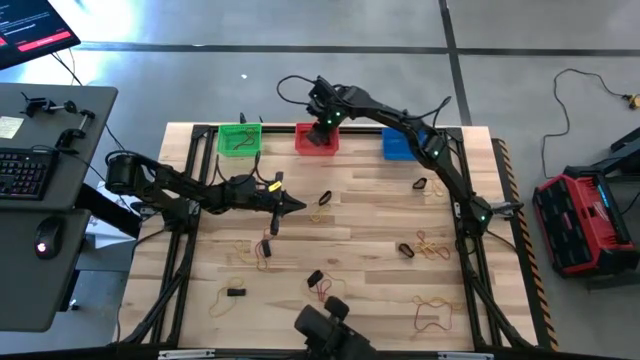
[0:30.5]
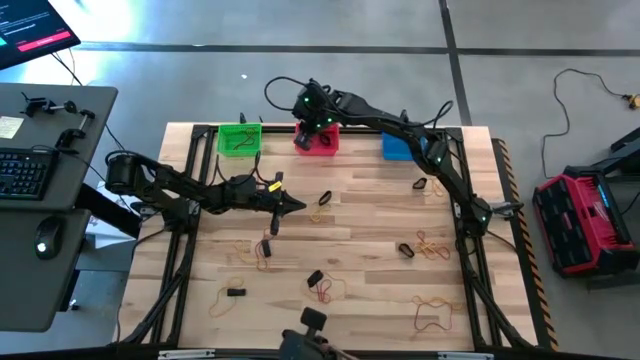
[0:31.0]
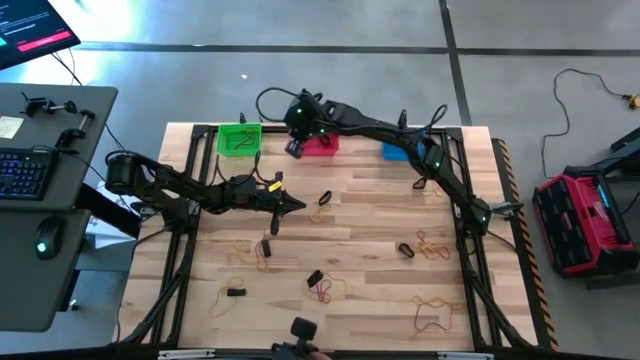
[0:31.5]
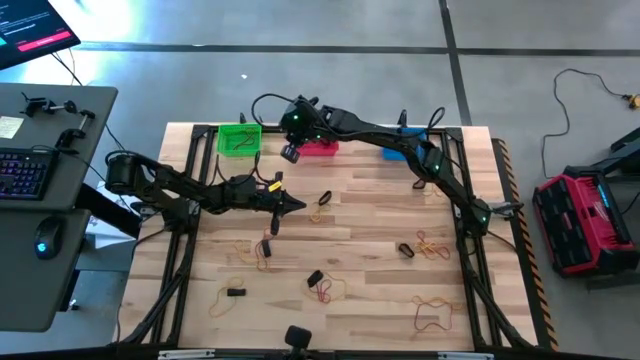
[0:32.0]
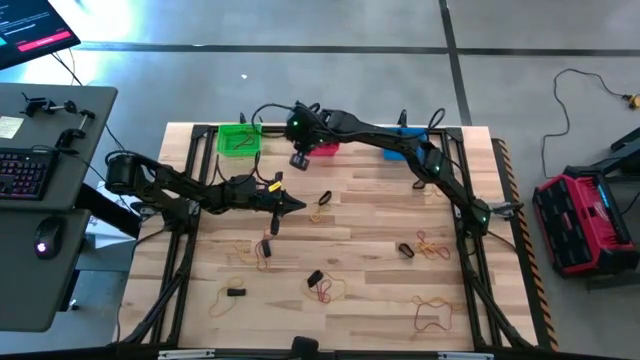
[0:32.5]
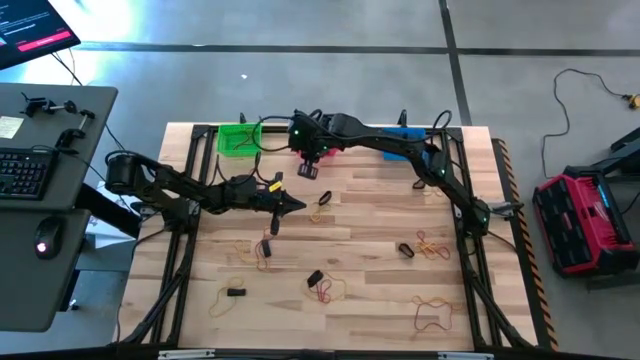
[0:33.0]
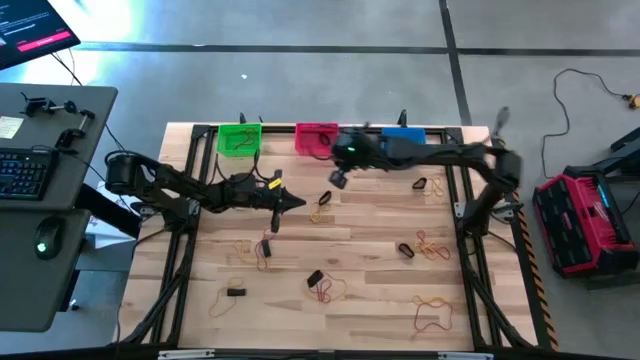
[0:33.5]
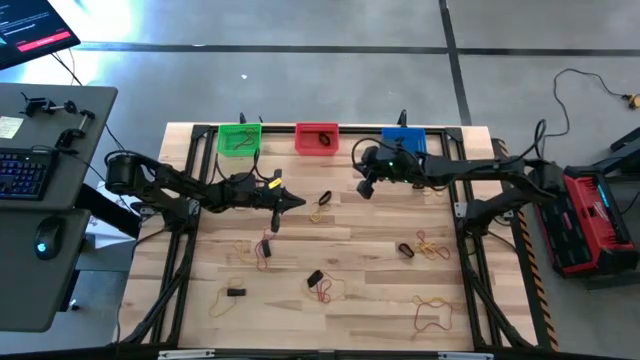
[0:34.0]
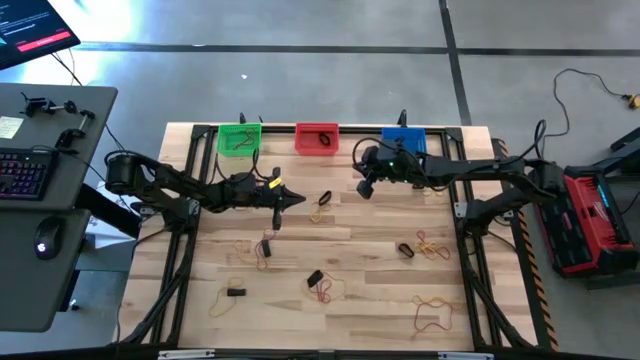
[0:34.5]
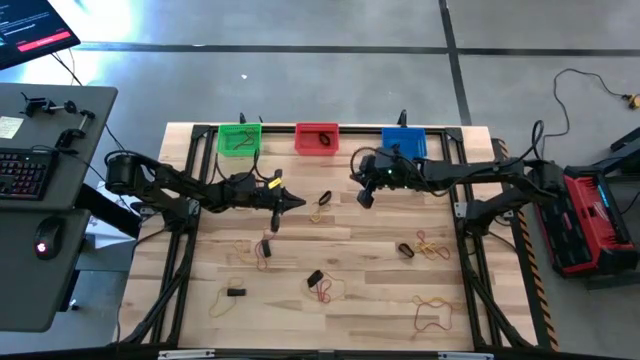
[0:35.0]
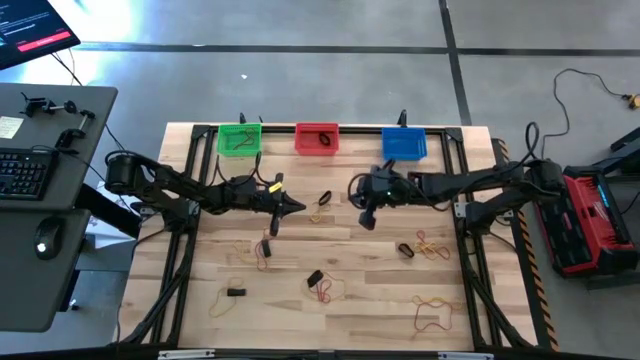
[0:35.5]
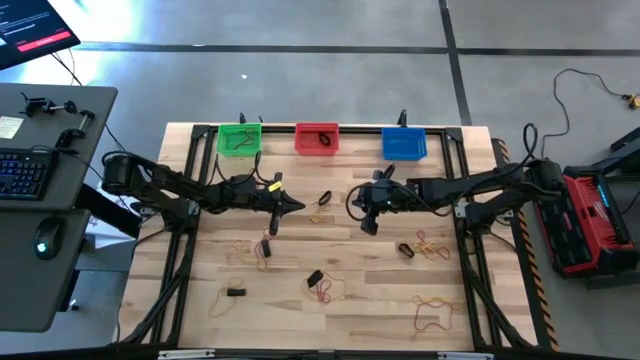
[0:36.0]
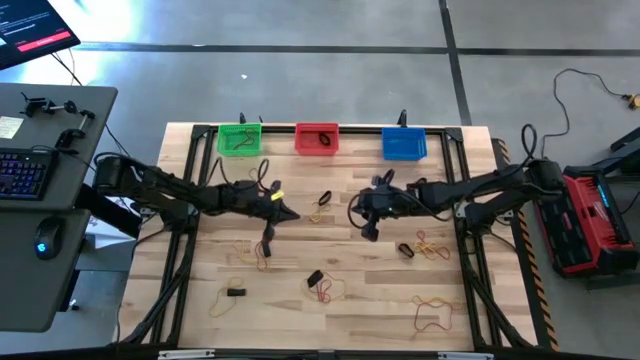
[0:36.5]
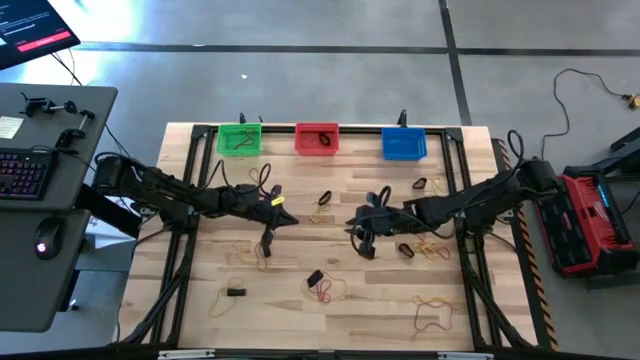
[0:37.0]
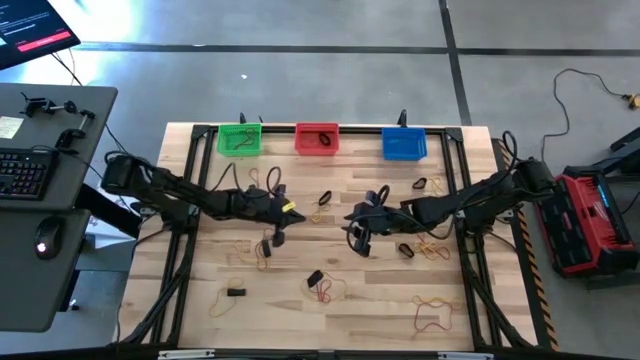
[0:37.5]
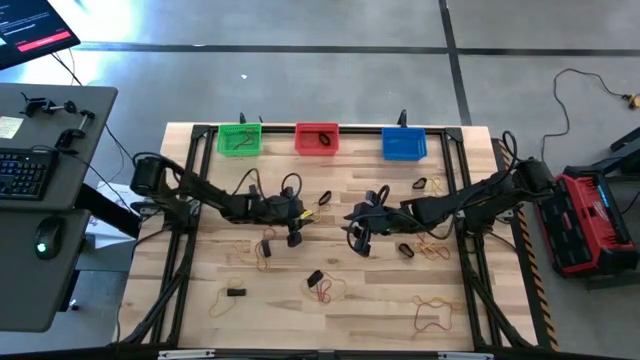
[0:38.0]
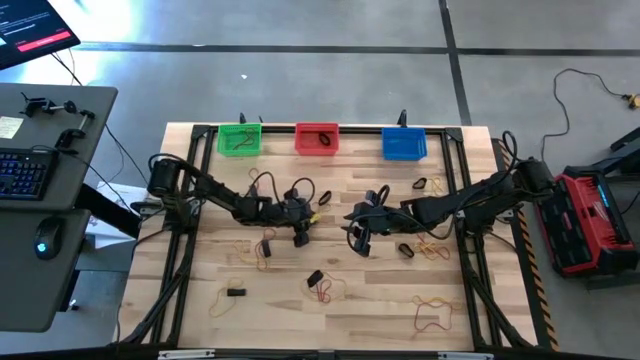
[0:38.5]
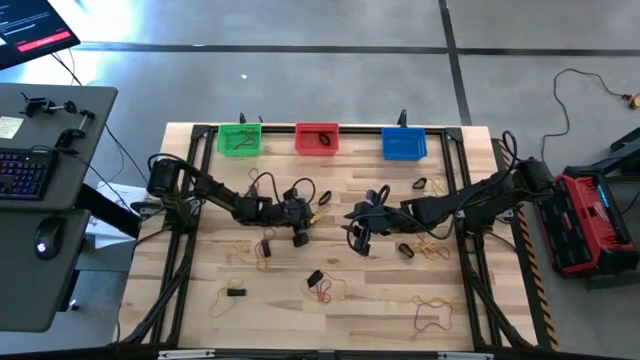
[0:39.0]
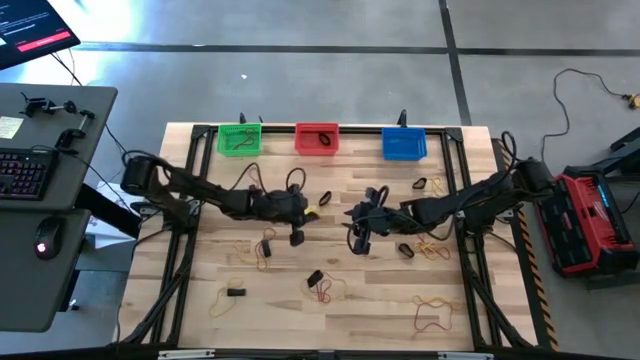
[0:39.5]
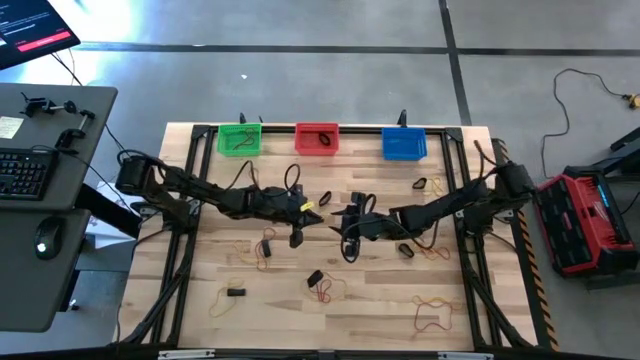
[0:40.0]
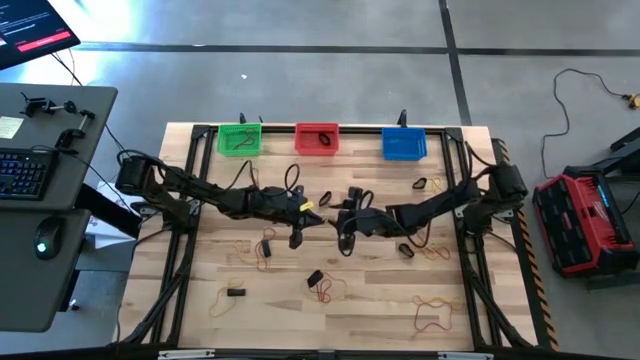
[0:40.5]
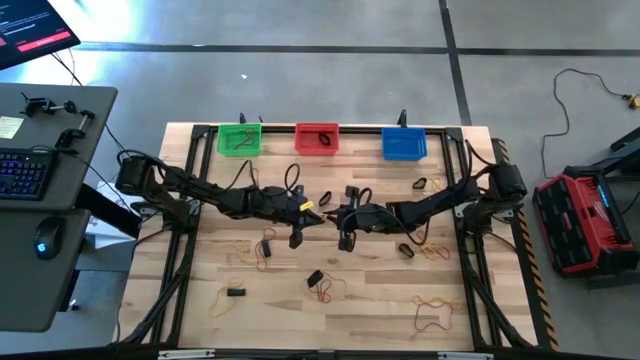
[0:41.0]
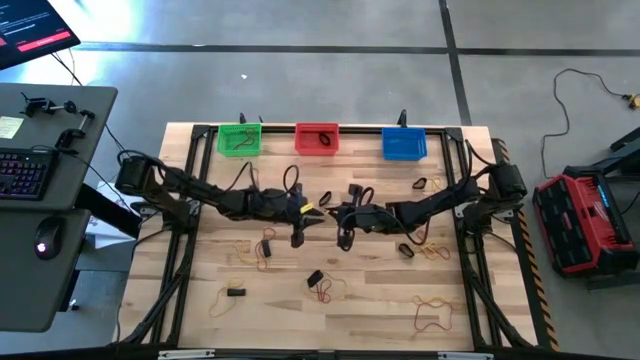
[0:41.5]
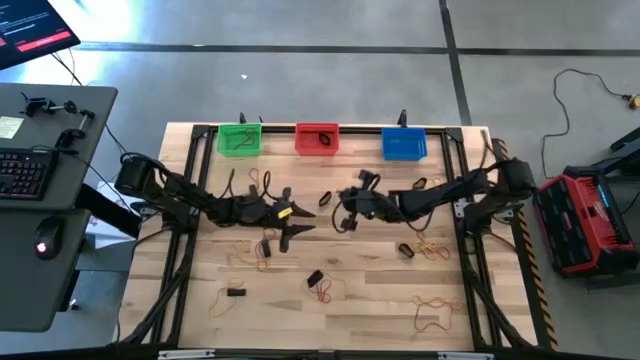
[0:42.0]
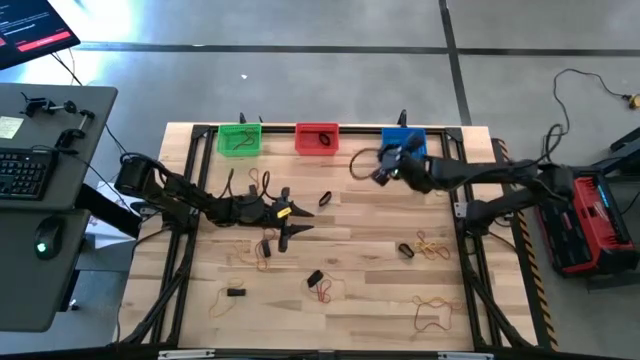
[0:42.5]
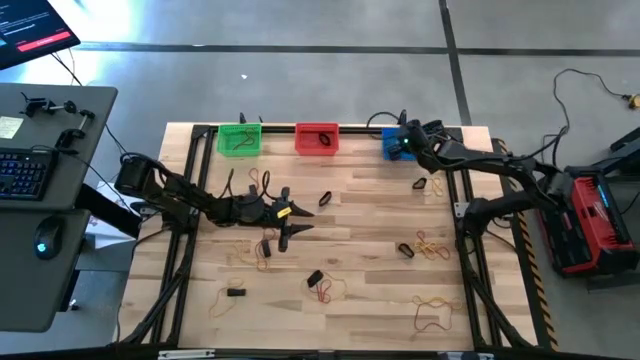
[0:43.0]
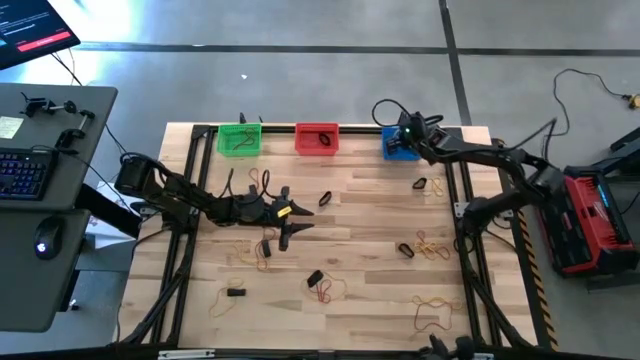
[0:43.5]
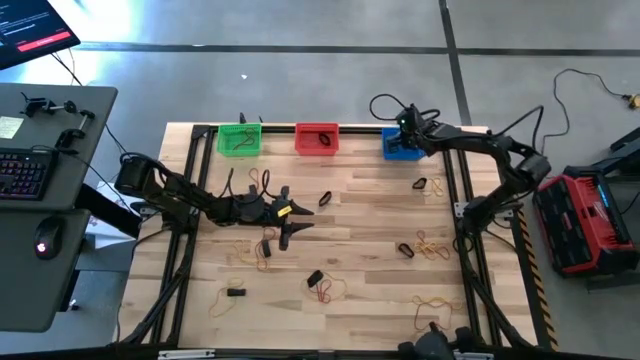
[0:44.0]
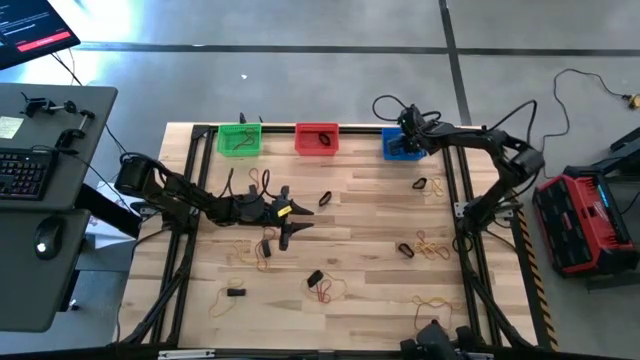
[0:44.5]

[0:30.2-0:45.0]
Task: Sort rubber bands into baskets
Put the yellow rubber band into the blue bin
